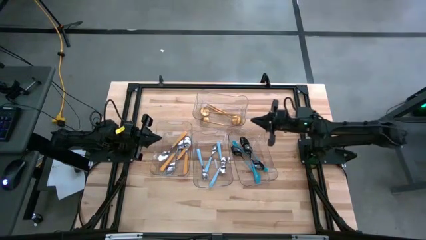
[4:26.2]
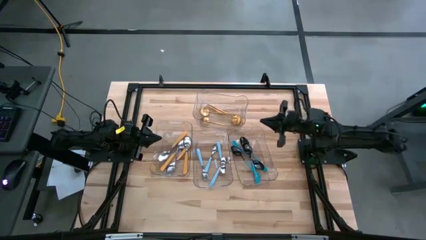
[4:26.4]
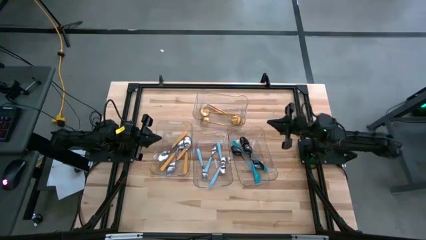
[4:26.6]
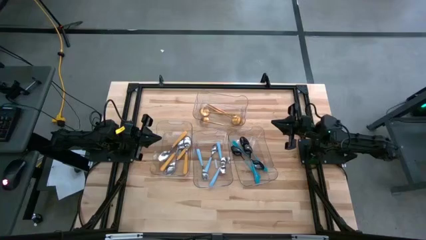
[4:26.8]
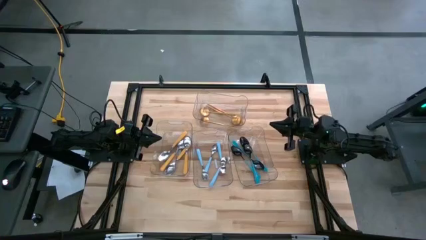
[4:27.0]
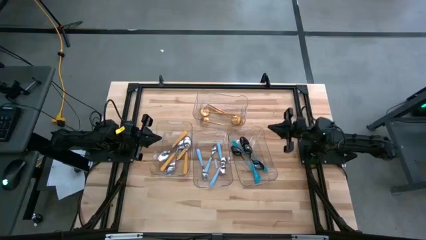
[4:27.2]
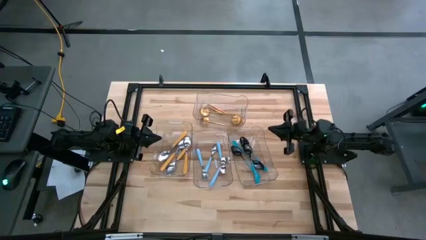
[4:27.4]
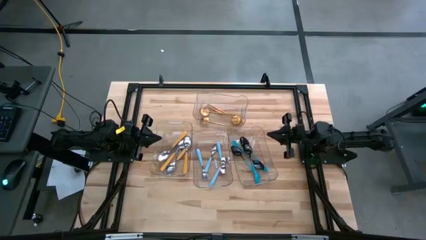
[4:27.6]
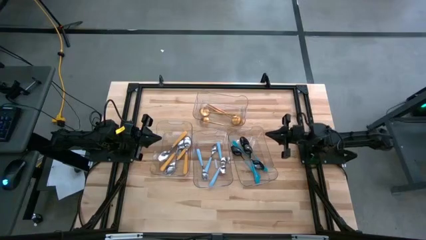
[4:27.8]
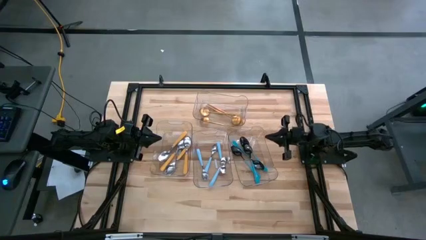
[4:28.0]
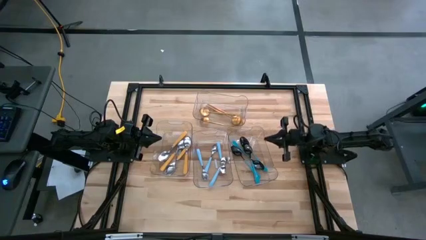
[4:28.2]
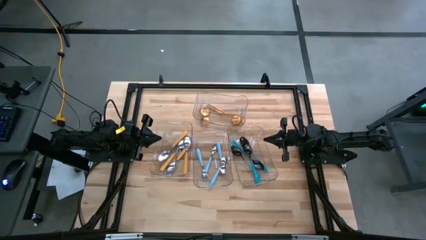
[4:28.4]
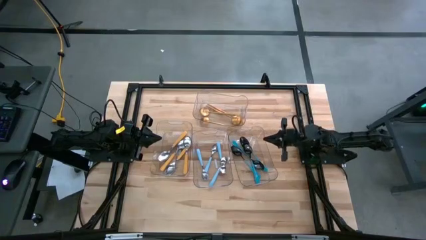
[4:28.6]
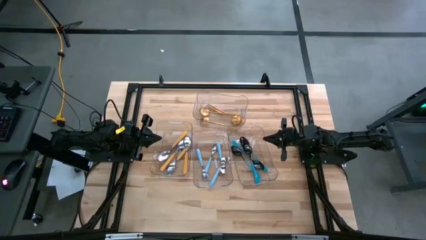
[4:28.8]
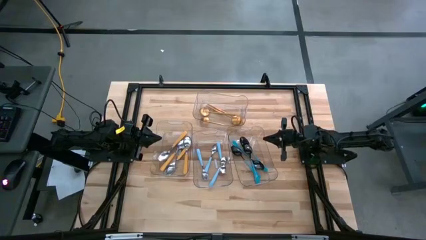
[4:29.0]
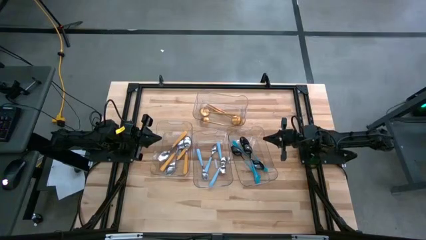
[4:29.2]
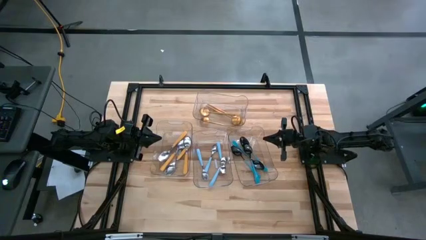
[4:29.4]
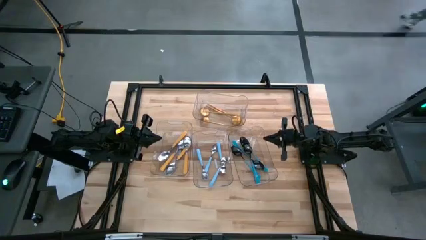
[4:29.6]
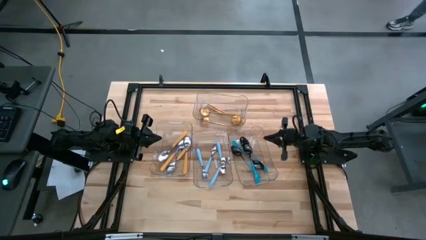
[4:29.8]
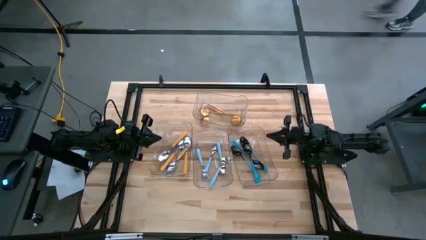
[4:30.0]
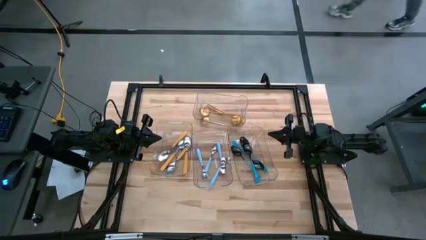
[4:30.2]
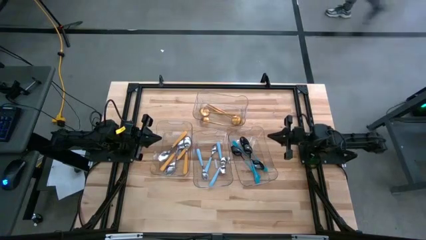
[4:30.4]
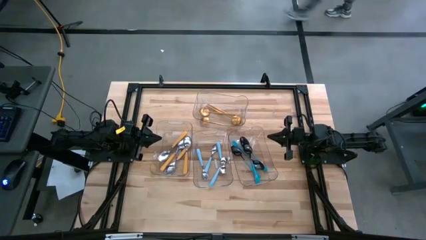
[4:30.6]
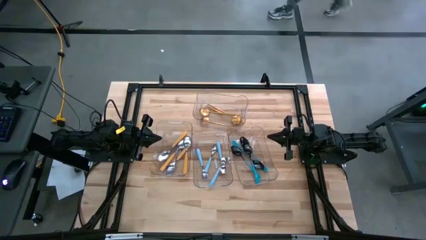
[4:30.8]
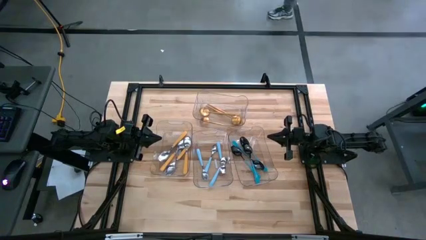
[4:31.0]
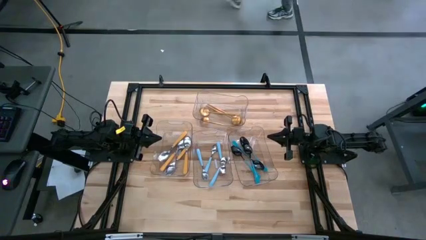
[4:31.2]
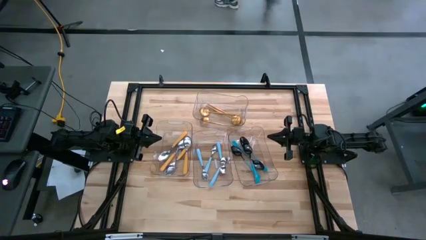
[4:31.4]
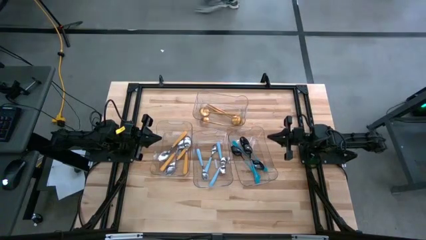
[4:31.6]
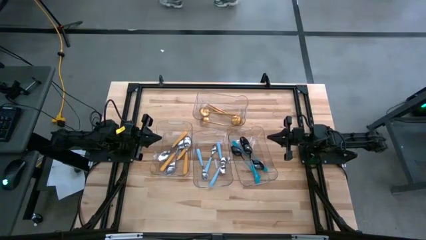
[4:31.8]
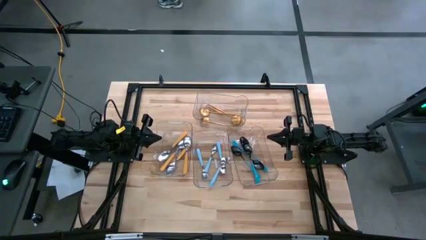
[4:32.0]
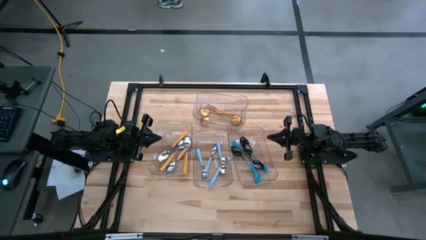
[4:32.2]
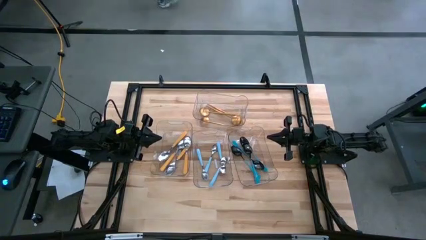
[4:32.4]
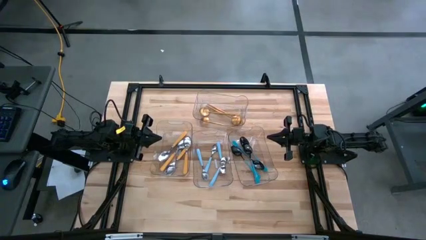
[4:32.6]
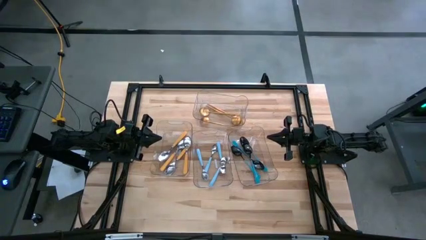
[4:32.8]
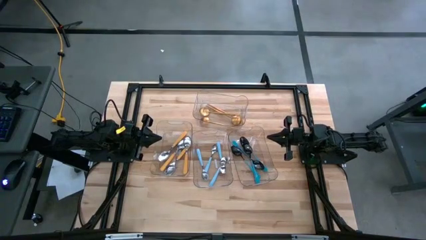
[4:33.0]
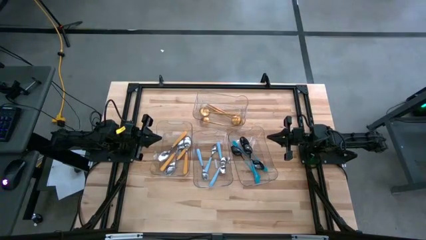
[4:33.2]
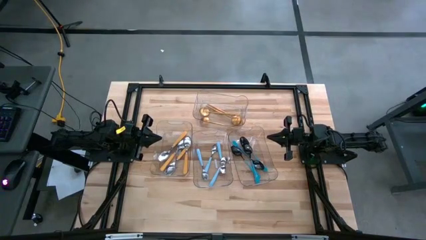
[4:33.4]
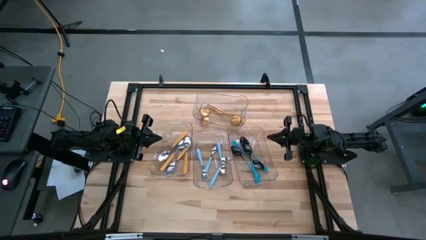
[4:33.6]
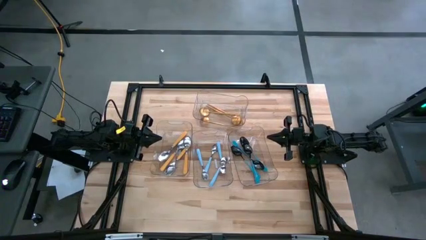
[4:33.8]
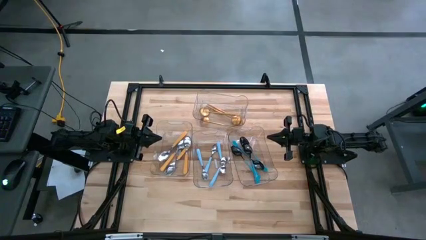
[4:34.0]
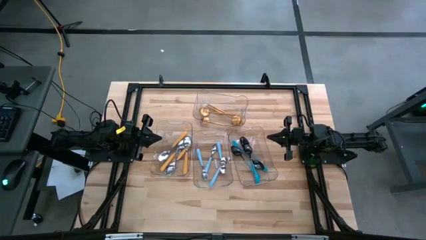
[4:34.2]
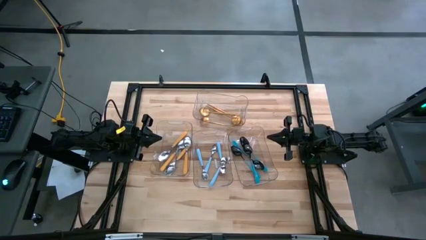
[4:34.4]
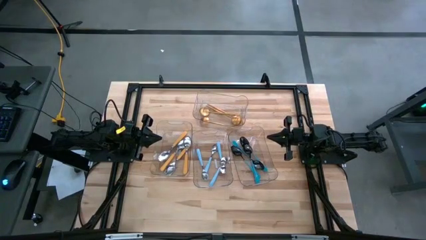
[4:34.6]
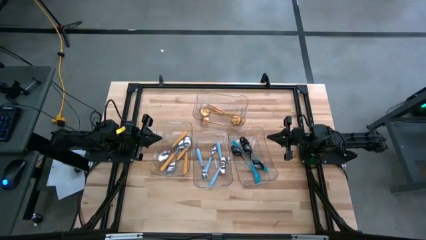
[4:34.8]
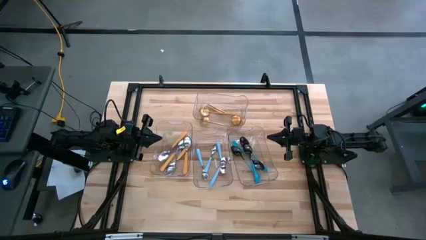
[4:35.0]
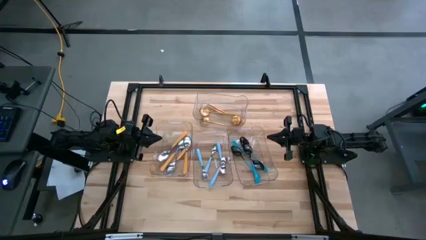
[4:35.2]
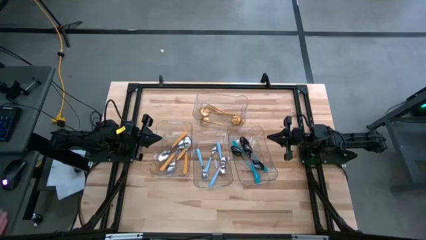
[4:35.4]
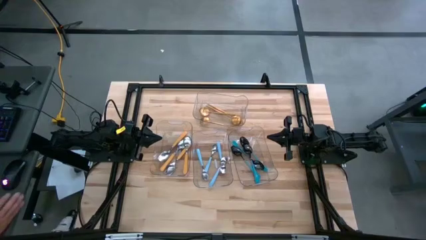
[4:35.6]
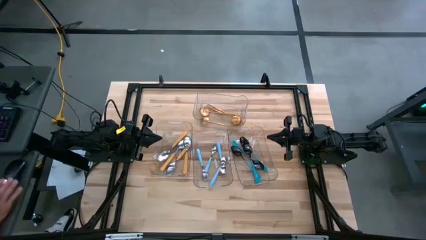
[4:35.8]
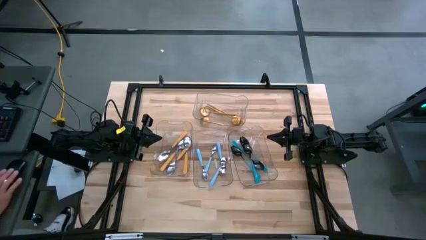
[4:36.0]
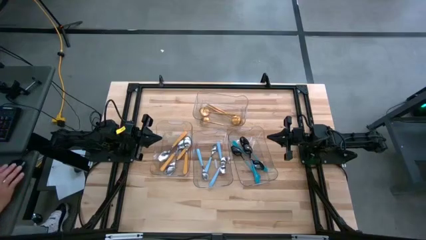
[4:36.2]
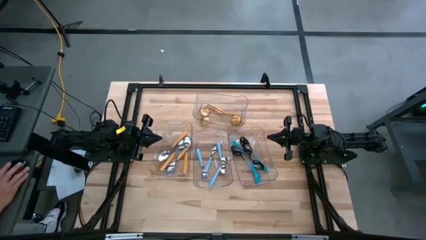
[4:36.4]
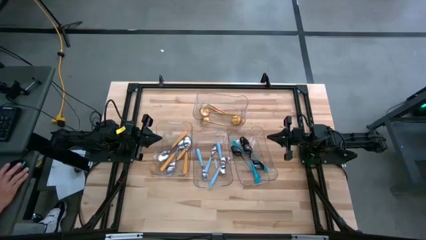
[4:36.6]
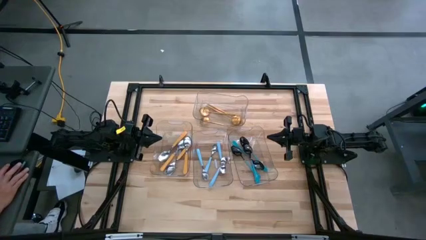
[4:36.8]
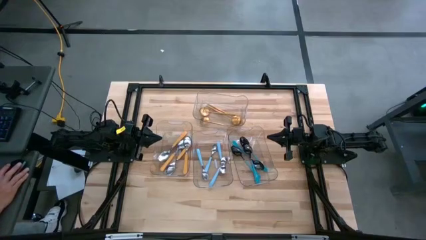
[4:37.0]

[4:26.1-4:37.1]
Task: Sort silverware by color (type)
Return to Home Position

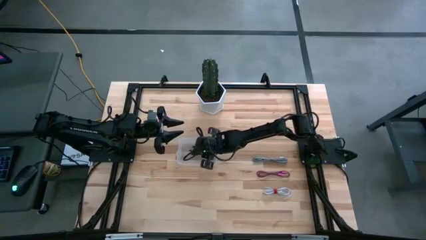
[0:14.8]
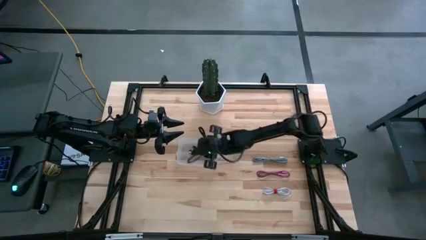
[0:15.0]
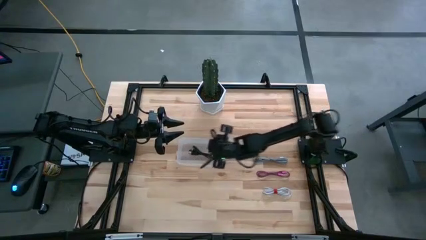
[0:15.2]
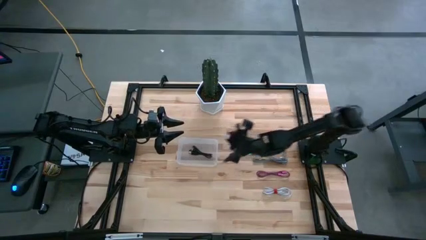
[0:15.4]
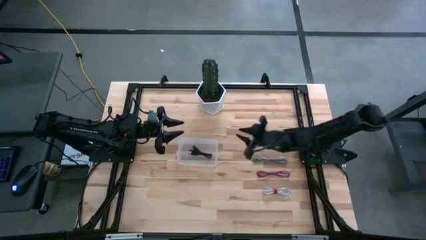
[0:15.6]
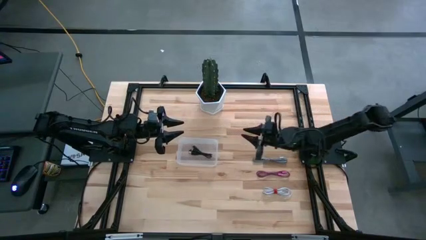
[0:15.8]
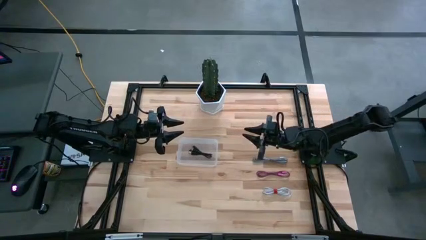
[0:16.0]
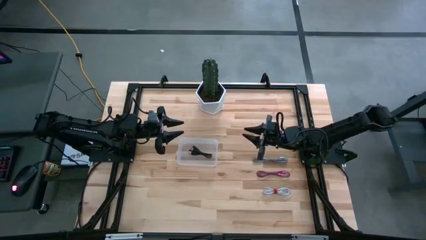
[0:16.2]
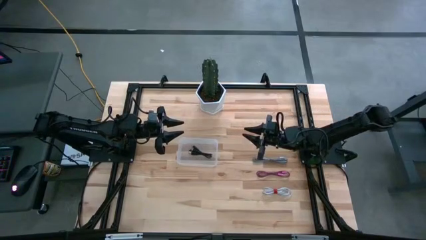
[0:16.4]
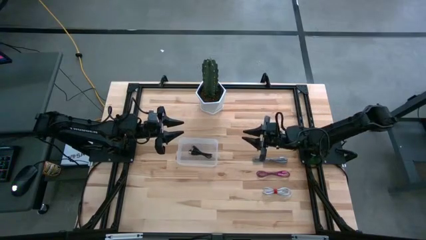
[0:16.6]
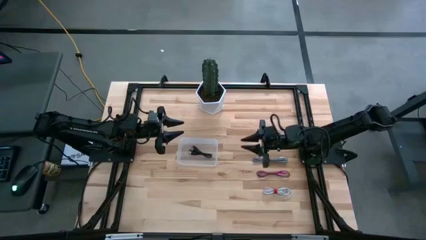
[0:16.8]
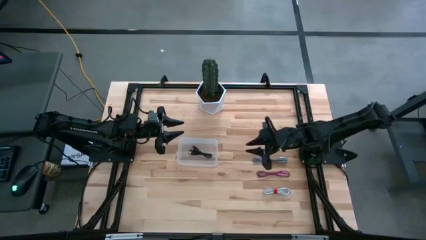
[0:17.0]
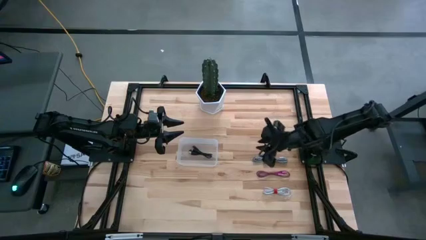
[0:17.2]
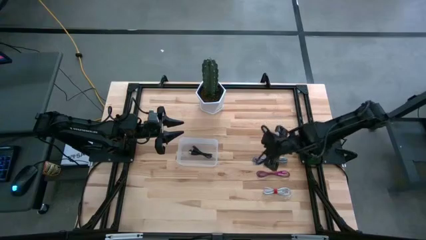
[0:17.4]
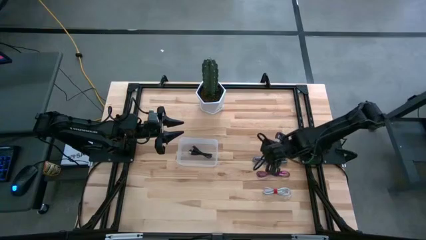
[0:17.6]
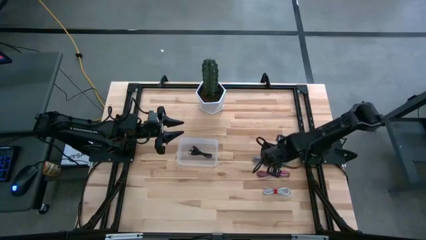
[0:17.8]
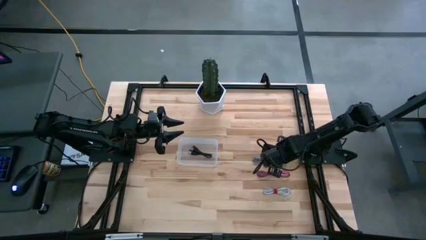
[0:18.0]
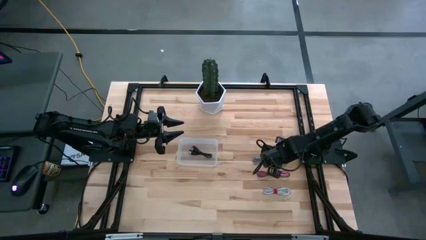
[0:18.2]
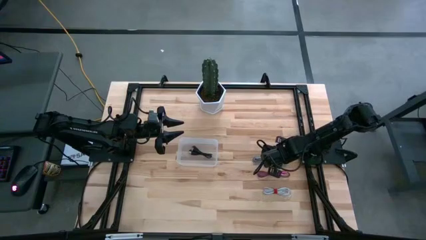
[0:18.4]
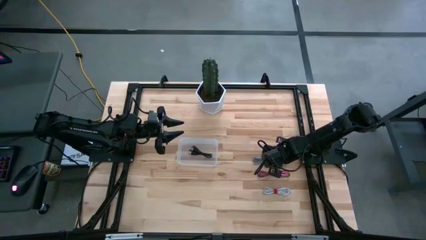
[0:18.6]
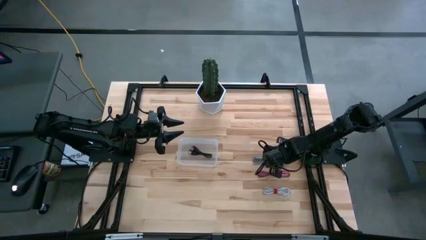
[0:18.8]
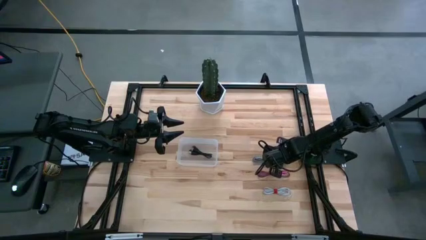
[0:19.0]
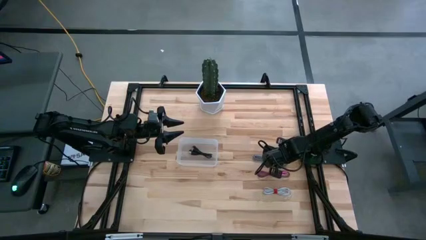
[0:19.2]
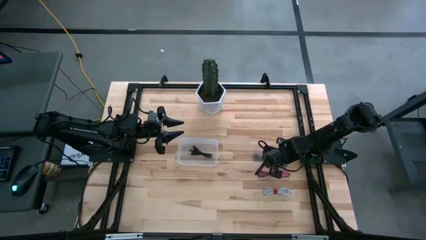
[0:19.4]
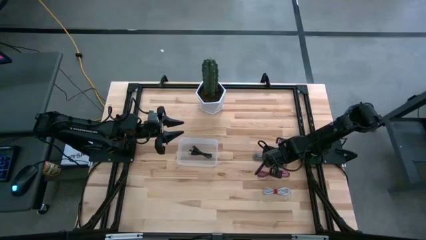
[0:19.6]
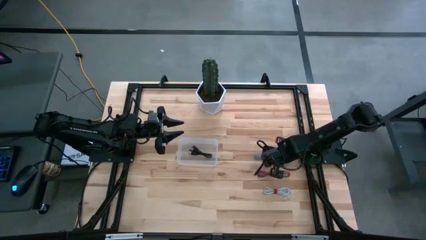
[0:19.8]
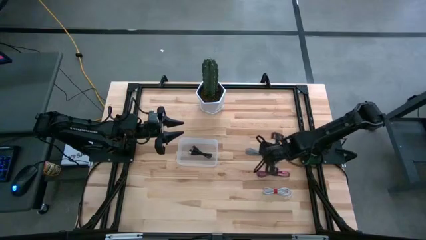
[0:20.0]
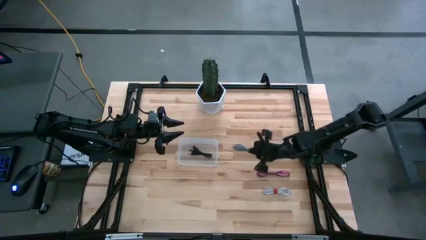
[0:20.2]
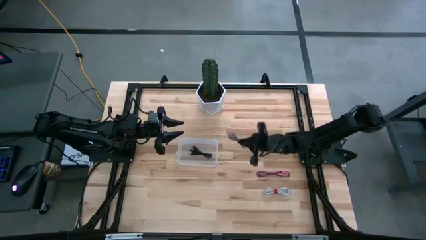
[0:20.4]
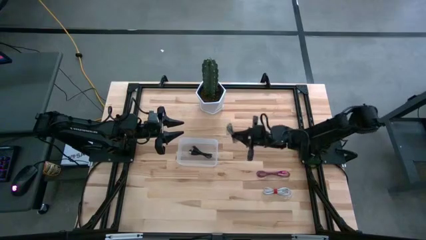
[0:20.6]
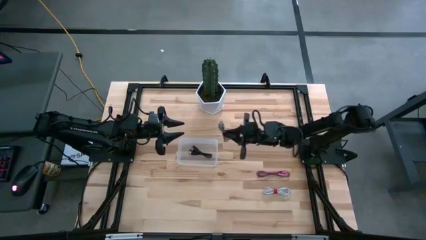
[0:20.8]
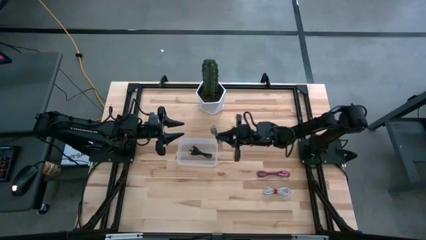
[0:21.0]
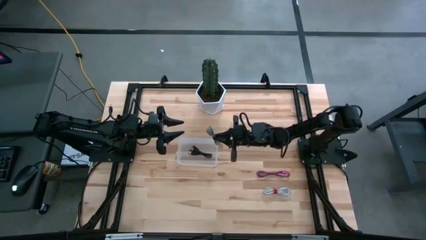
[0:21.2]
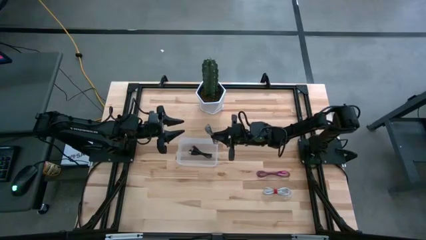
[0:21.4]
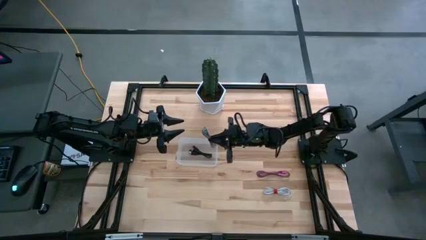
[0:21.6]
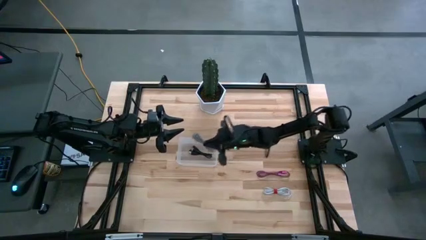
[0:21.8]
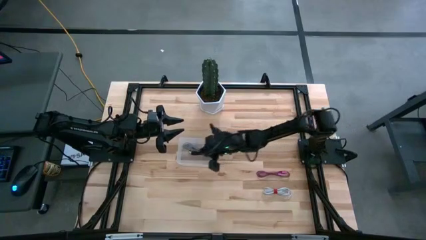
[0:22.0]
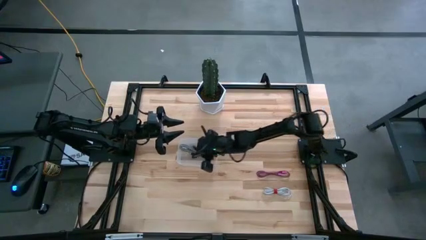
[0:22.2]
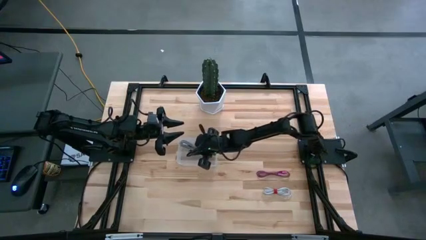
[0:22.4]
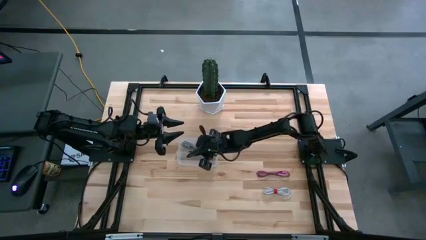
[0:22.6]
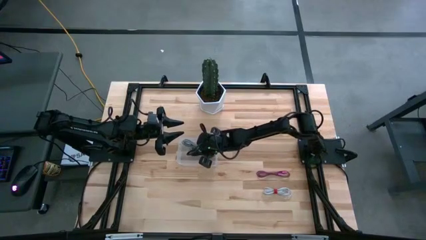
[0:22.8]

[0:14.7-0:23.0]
Task: Pick and place USB-C Cables
Put the black and white charger cable into the transparent bin
